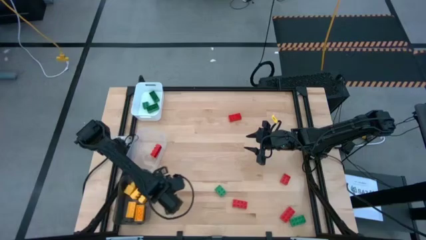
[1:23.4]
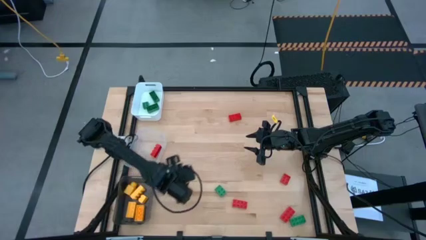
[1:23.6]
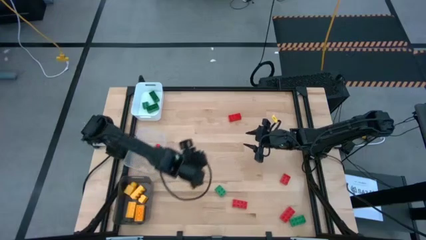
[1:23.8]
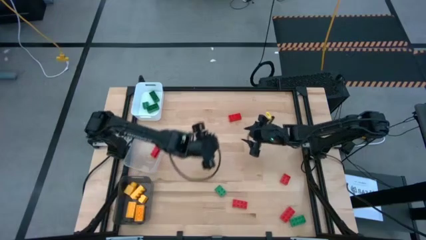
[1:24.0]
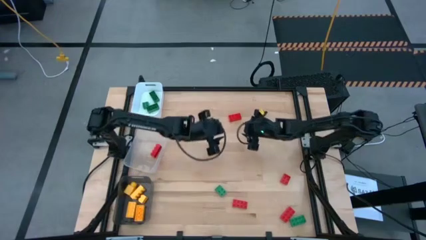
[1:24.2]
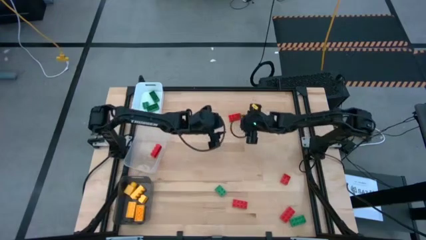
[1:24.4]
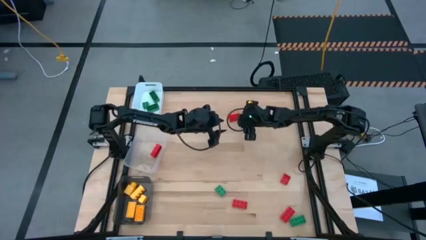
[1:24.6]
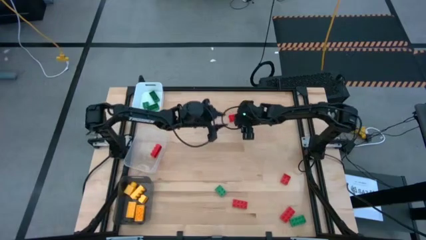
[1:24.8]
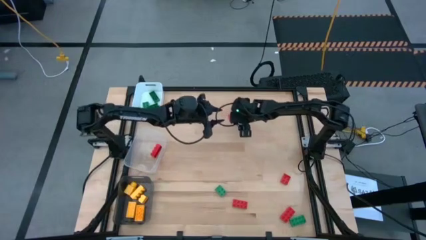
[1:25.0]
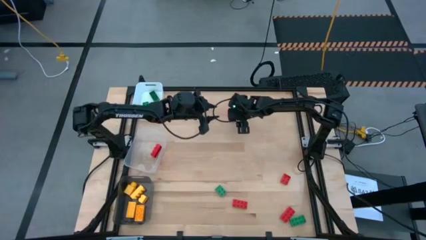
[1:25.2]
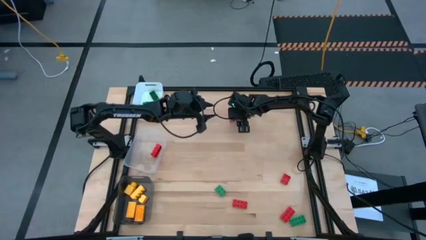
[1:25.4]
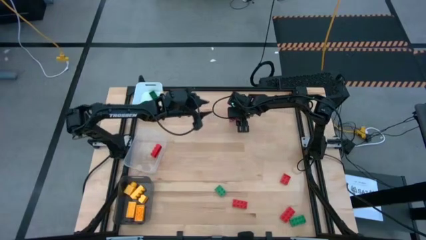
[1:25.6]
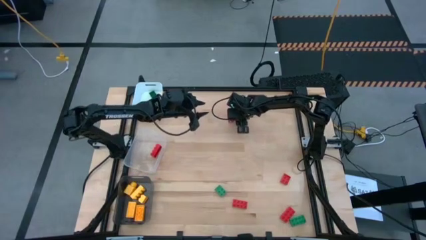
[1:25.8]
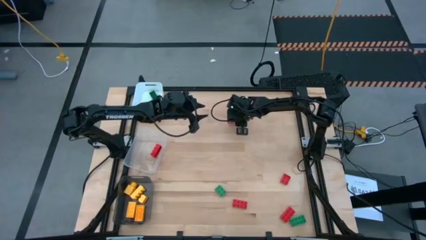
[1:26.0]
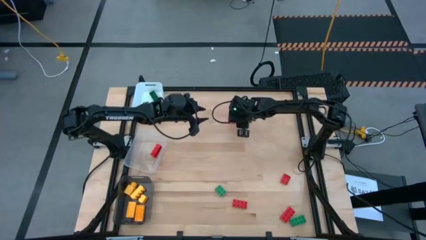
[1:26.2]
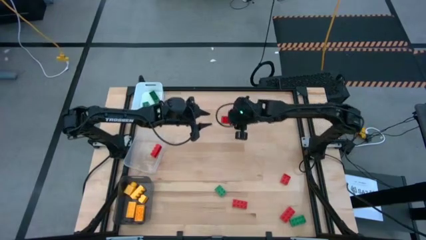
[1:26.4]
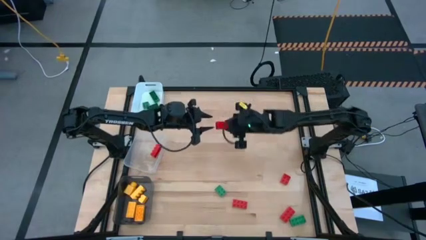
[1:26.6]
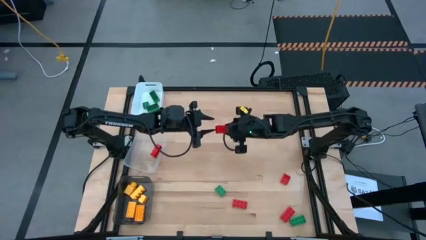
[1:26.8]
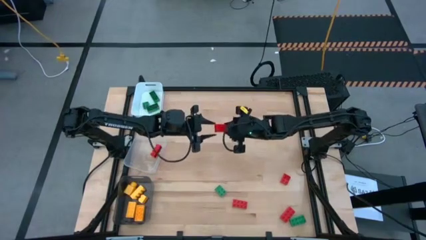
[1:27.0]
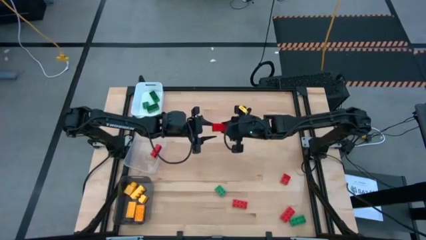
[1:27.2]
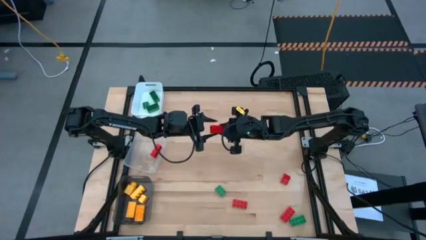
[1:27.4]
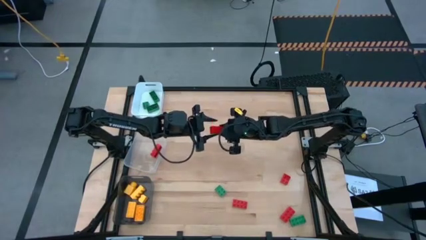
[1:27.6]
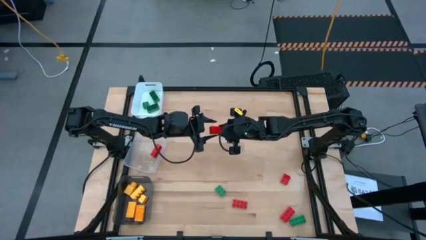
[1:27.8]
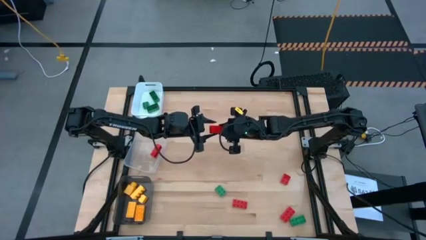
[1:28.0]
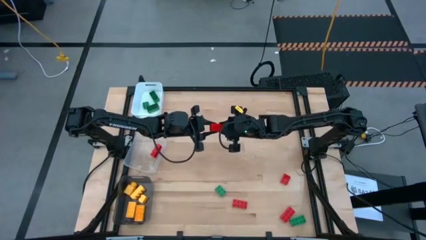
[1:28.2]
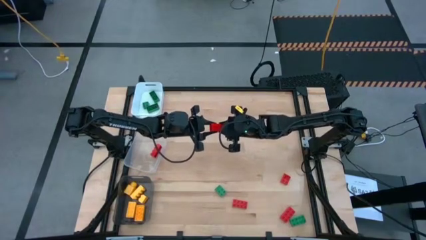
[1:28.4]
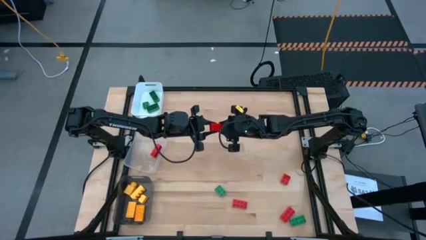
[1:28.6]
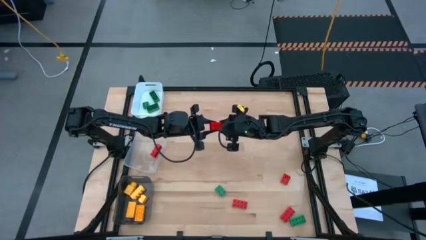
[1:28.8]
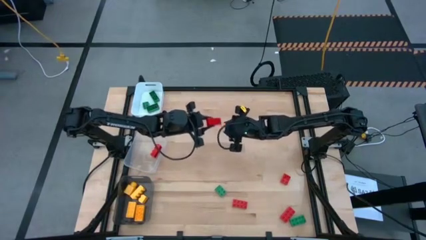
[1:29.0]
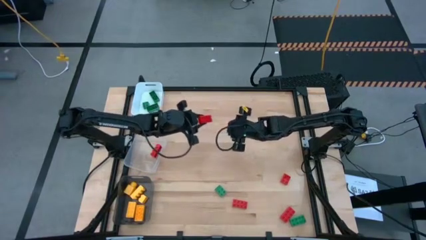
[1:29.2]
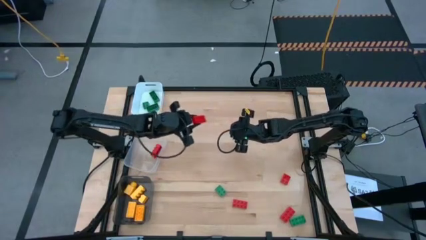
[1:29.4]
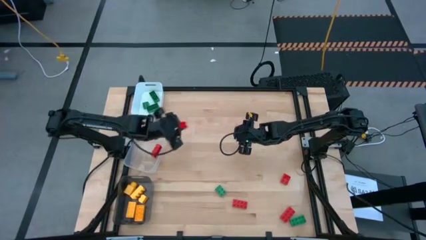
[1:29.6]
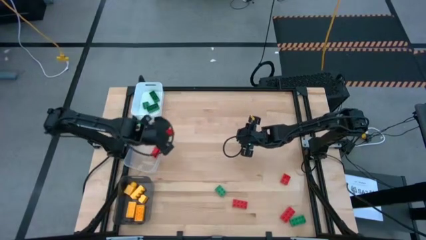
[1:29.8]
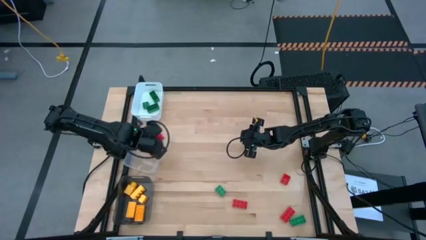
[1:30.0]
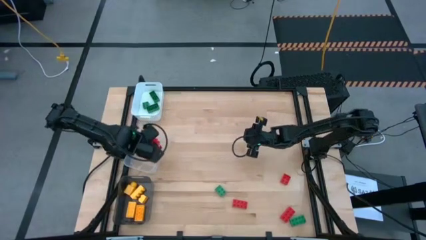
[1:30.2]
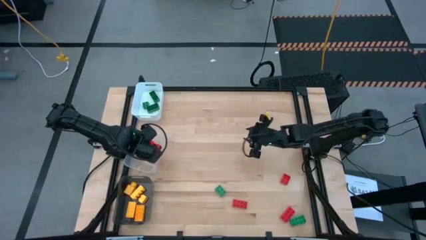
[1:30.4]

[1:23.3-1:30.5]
Task: Sort & place blocks by color
Put the red game piece into the transparent bin

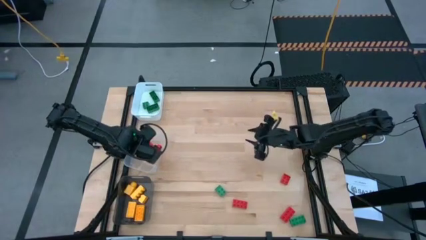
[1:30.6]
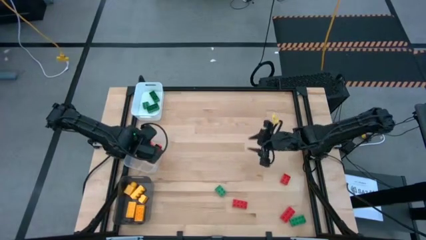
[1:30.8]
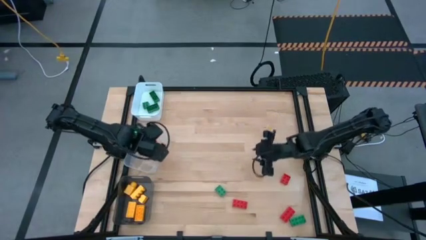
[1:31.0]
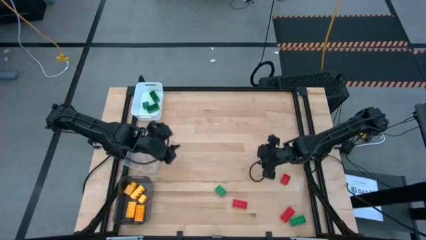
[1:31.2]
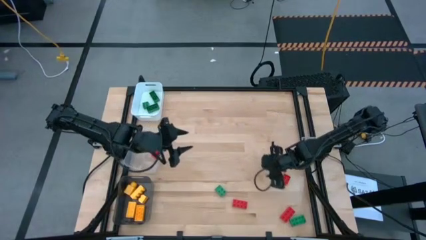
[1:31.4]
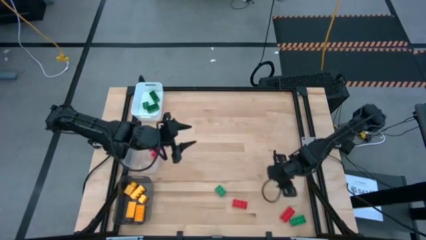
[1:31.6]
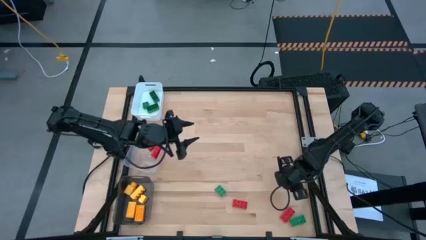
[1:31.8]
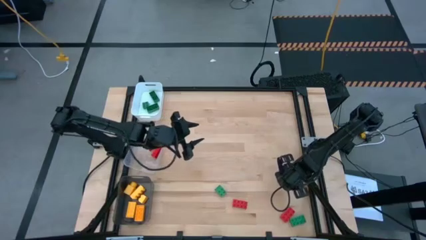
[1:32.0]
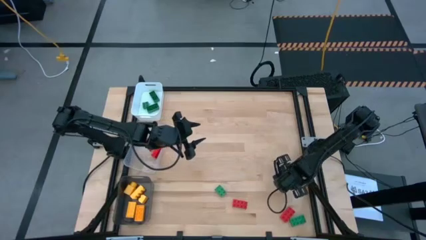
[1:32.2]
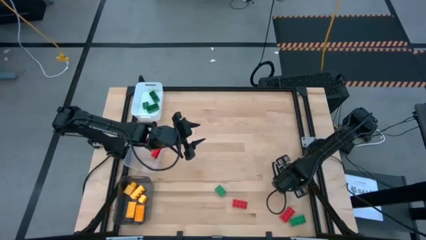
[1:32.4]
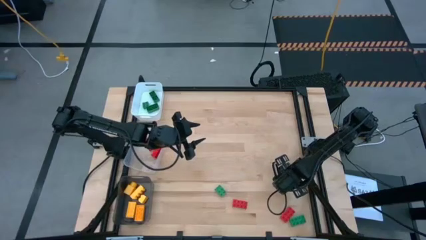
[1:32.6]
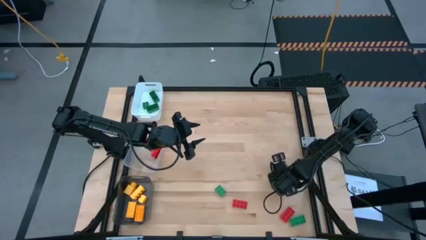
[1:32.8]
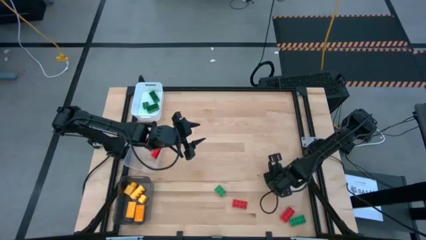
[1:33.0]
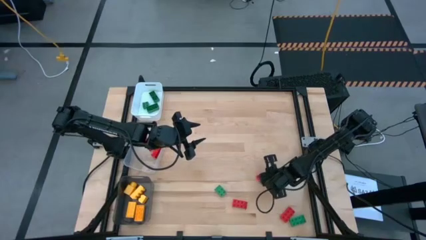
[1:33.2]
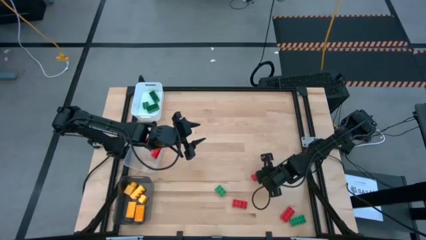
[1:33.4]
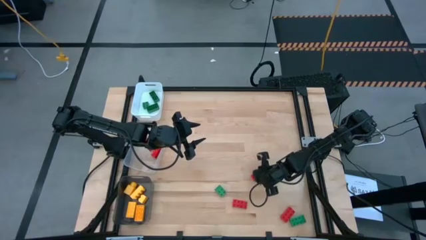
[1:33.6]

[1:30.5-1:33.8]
Put the top red game piece into the transparent bin

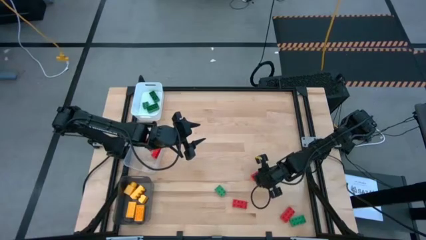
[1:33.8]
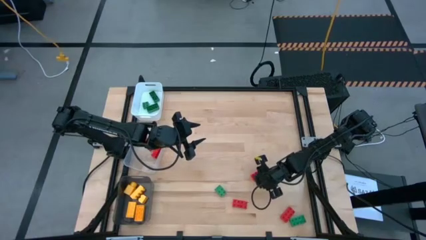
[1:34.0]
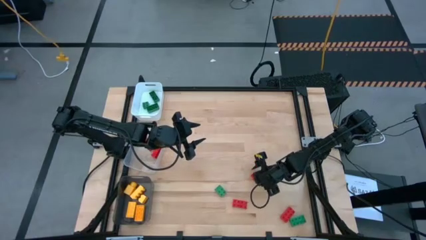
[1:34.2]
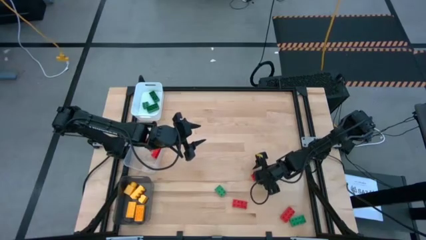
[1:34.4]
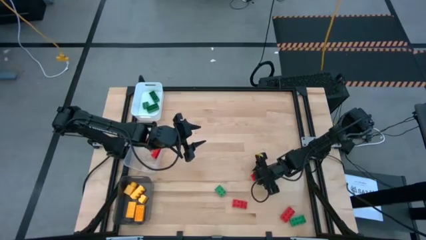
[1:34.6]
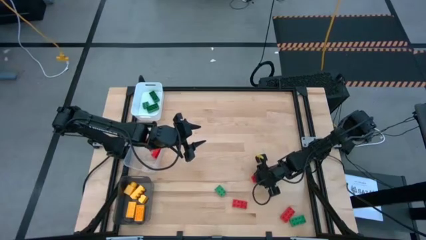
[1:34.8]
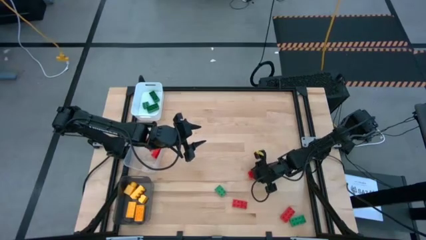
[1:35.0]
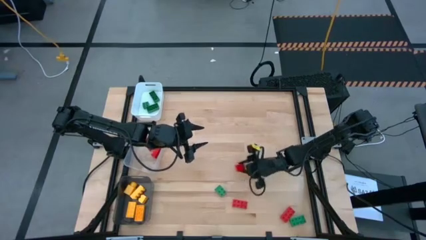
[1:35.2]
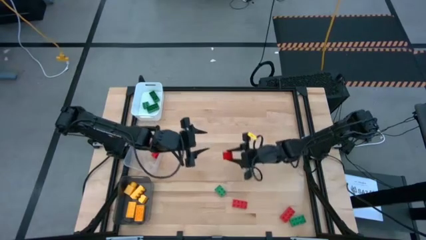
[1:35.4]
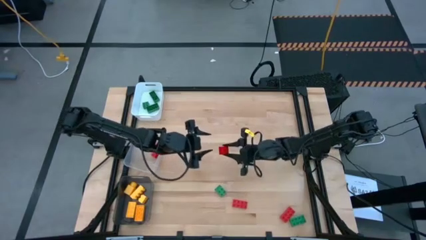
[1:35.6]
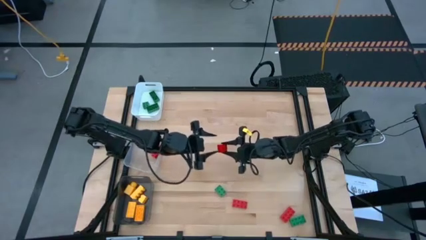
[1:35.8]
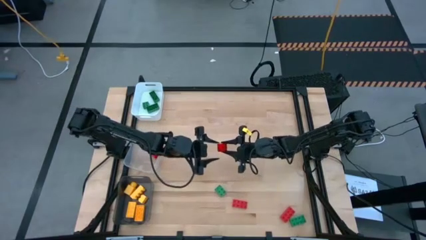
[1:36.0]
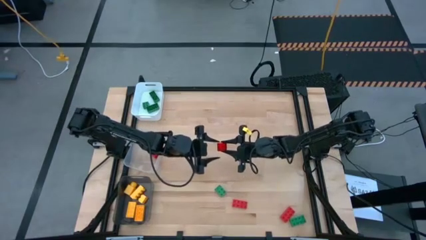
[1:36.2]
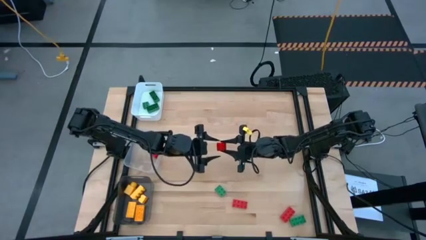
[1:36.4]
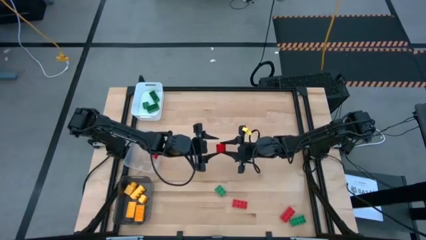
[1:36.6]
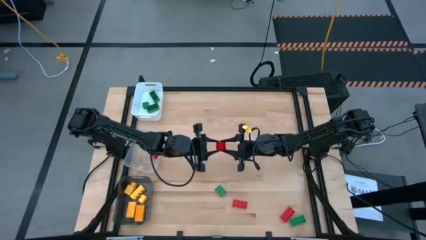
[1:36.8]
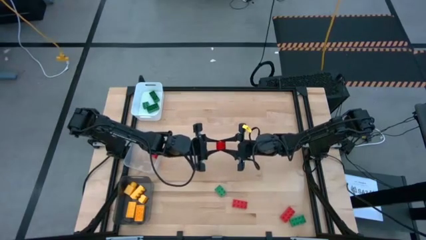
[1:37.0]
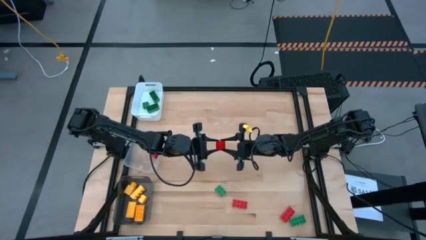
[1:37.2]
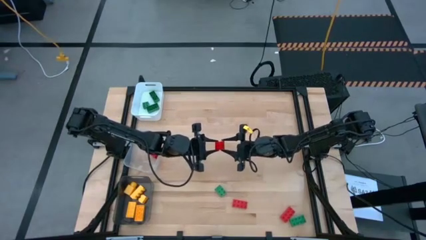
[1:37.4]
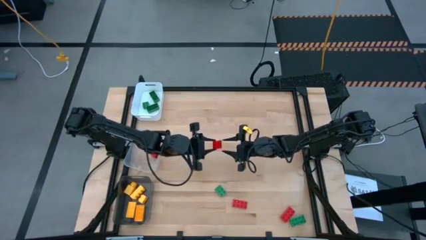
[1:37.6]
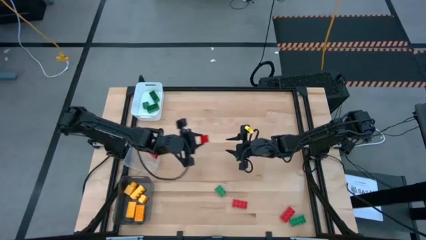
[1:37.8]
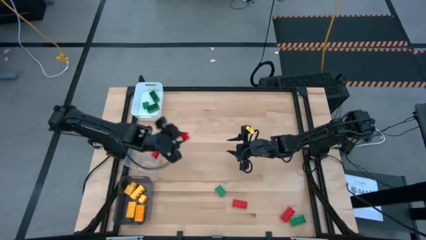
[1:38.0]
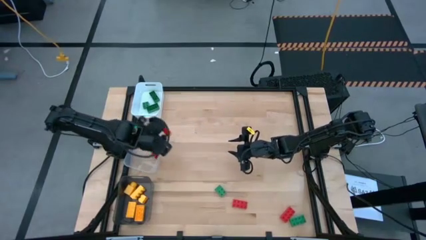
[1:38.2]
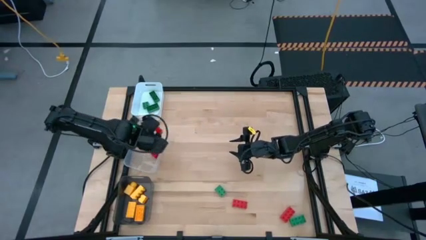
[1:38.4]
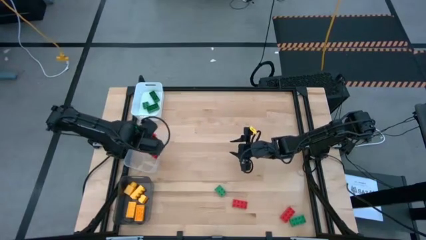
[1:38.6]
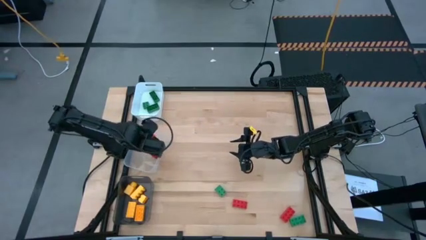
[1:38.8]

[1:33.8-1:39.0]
Put the top red game piece into the transparent bin

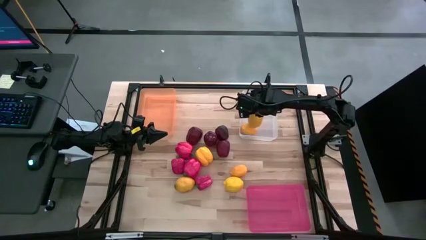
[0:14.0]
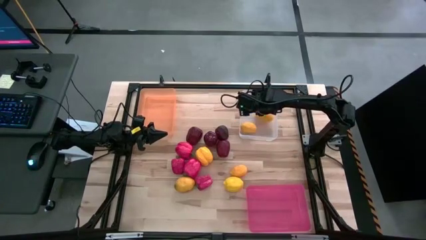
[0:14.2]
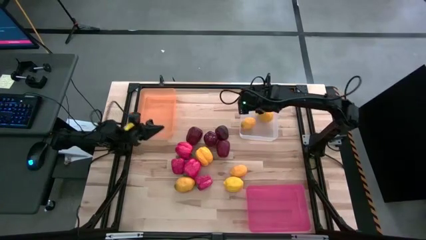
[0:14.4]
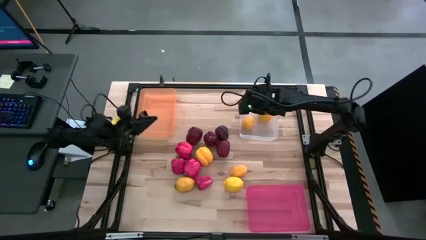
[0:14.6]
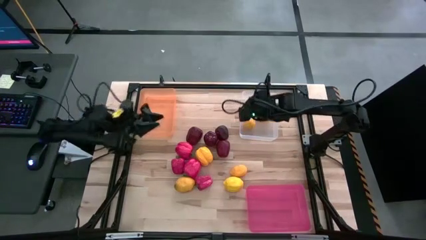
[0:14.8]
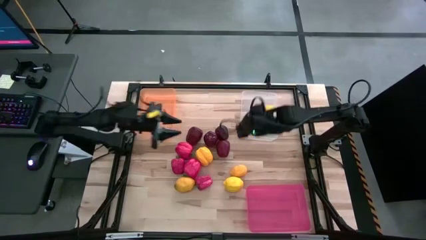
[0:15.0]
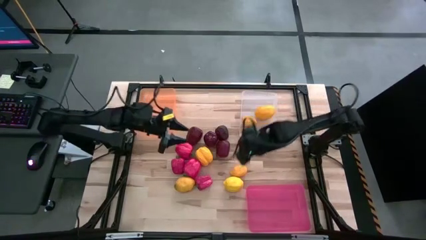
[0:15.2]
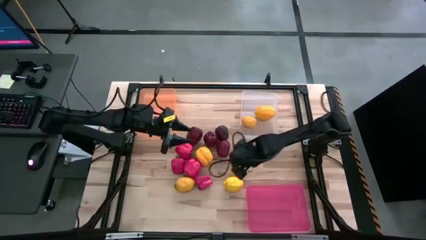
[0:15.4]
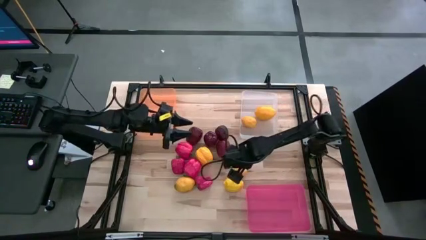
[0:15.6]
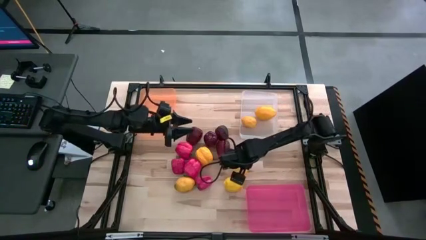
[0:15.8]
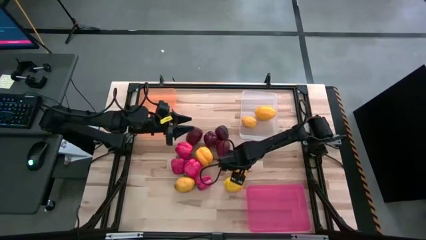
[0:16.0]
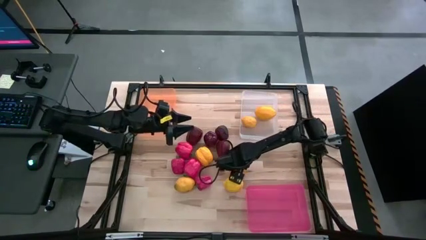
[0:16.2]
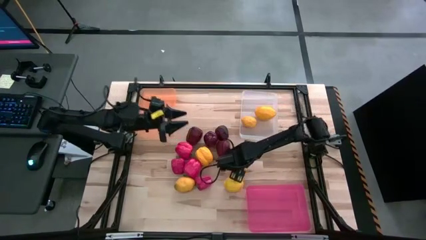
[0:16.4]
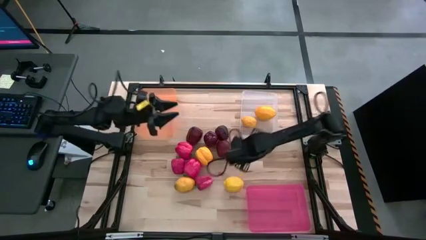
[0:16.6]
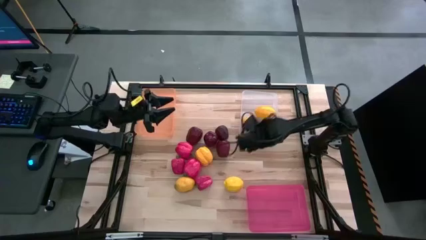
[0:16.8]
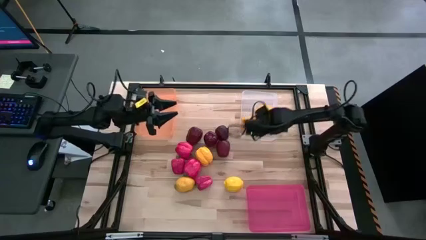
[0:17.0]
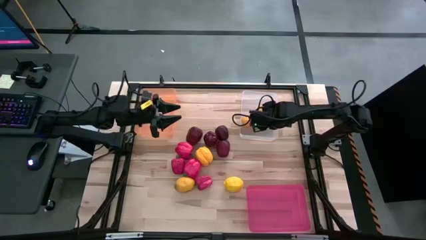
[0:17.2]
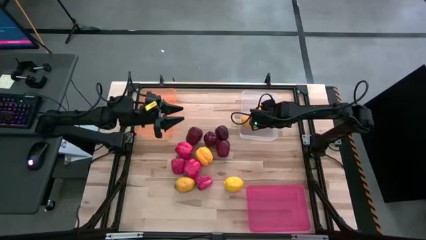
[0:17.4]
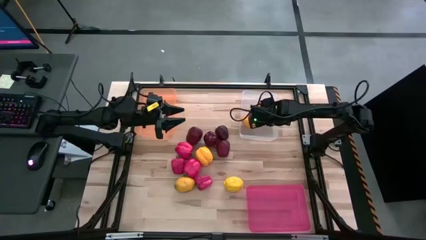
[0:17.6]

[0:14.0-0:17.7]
Task: Sort produce into baskets
Put the lemon into the white bin
